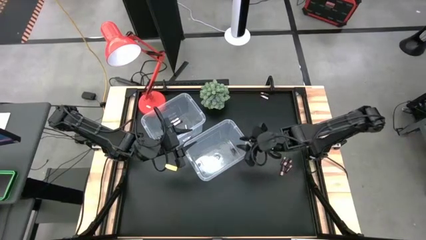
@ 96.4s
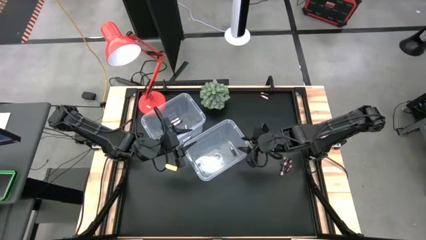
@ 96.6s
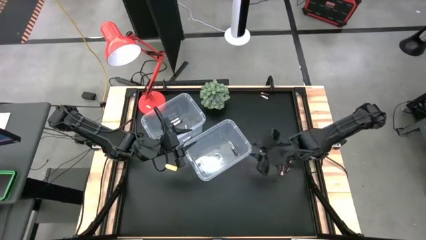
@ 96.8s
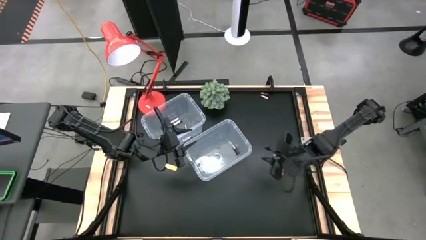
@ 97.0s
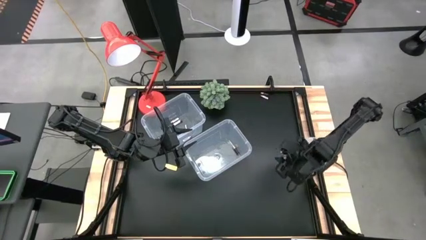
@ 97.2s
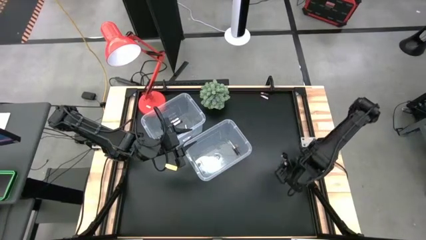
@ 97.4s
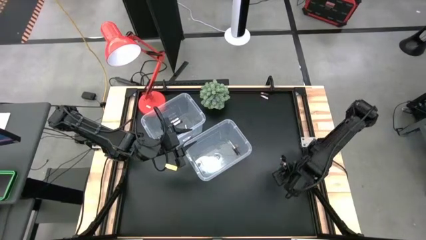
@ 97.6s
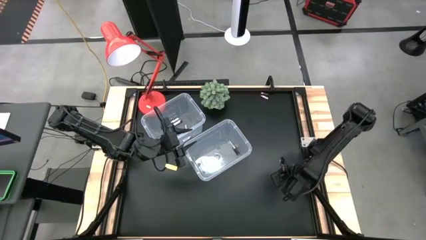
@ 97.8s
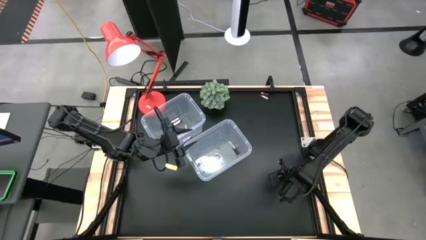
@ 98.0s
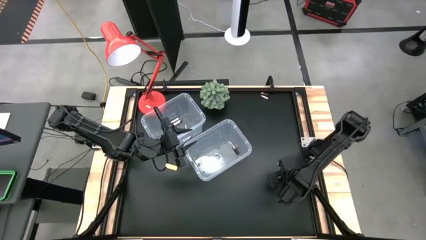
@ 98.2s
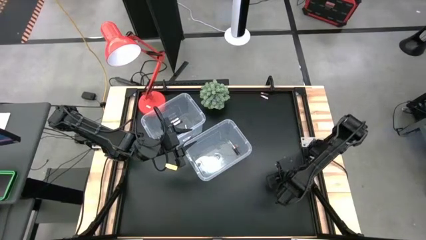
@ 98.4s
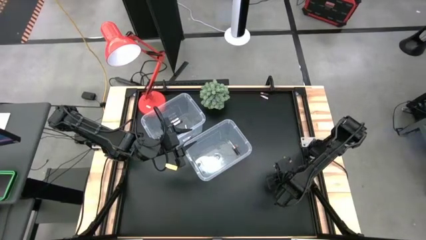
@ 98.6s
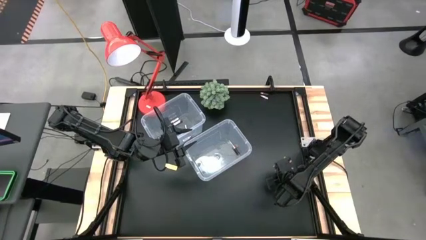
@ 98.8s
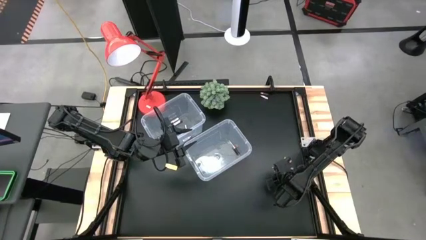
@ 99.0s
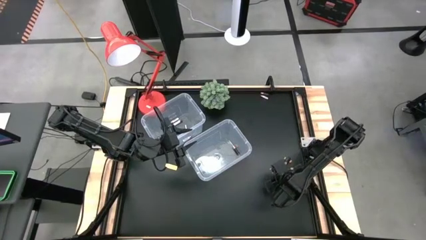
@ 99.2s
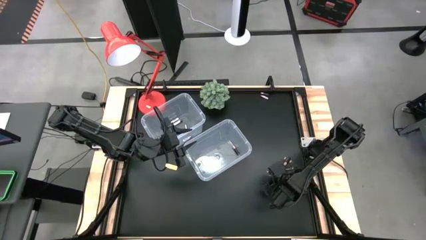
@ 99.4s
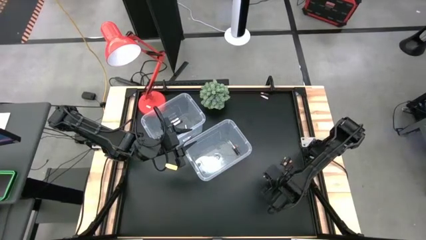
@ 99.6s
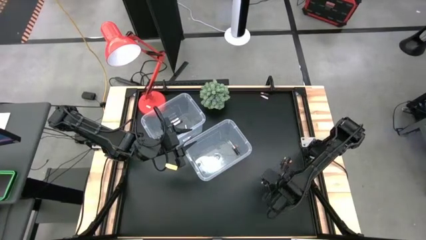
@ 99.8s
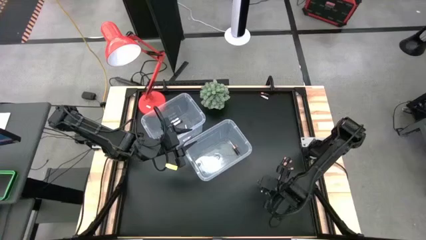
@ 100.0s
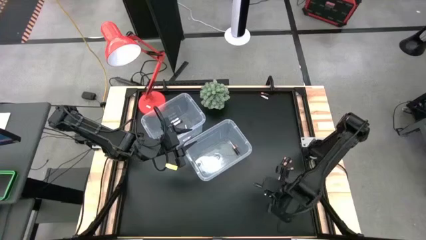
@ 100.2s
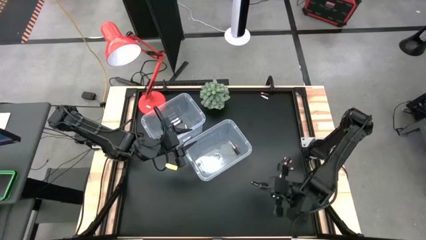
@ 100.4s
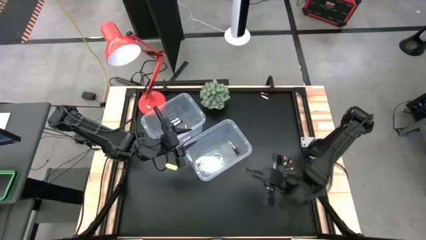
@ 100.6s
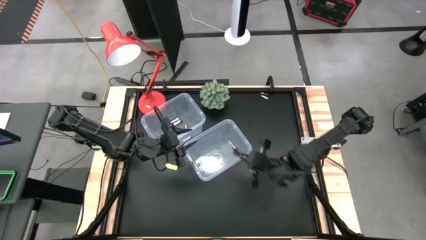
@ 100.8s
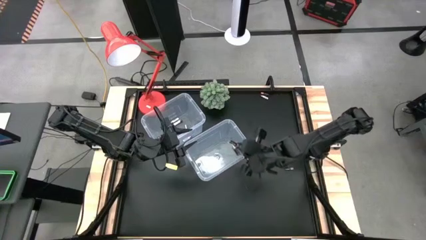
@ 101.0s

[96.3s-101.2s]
Task: Sort batteries
Put the brown battery into the bottom transparent bin

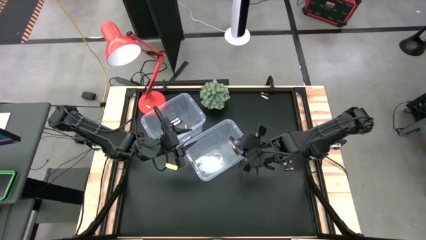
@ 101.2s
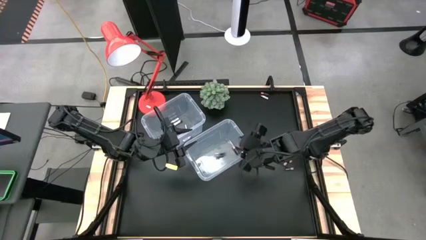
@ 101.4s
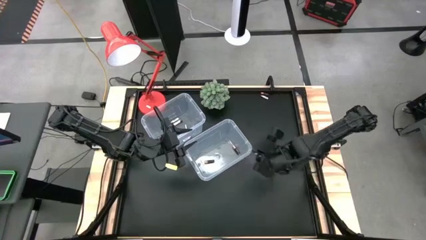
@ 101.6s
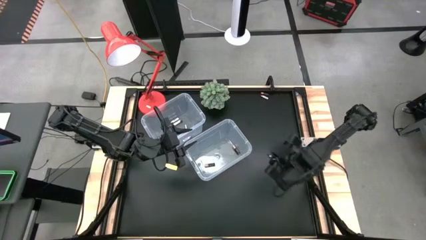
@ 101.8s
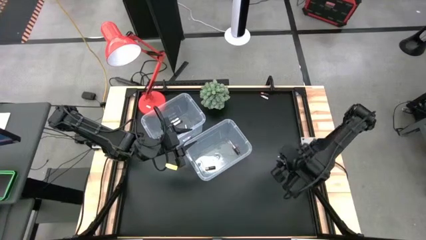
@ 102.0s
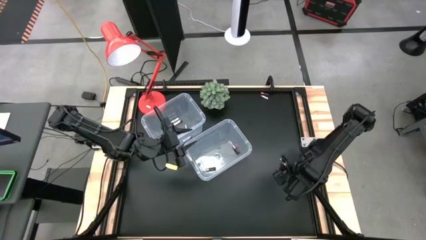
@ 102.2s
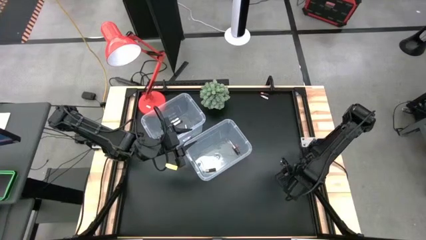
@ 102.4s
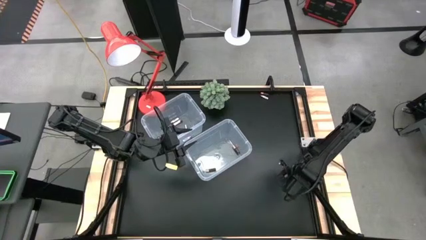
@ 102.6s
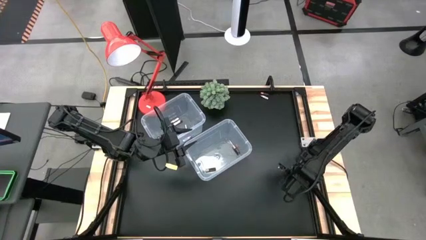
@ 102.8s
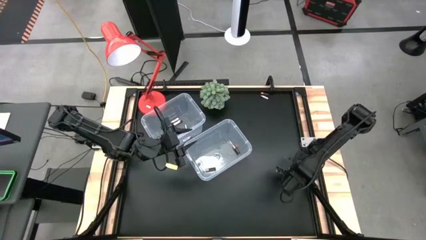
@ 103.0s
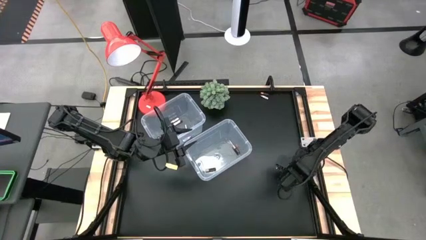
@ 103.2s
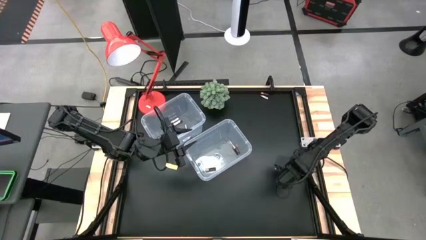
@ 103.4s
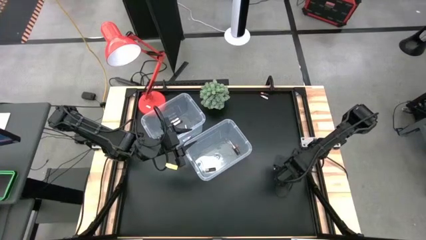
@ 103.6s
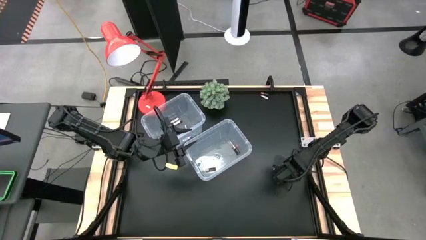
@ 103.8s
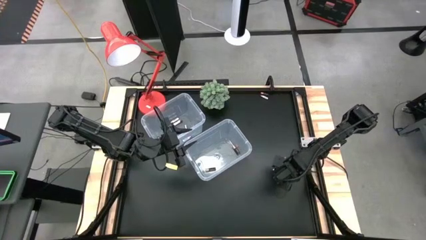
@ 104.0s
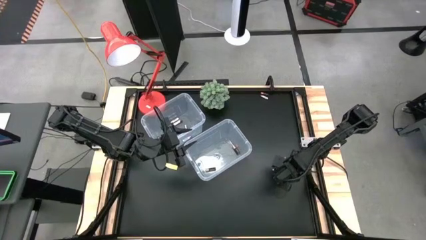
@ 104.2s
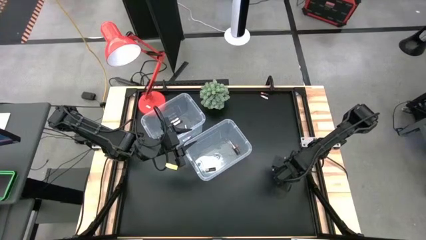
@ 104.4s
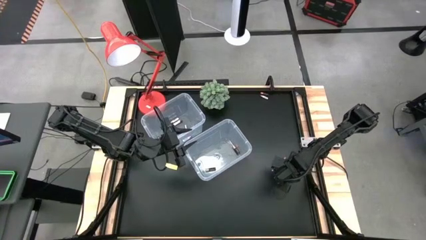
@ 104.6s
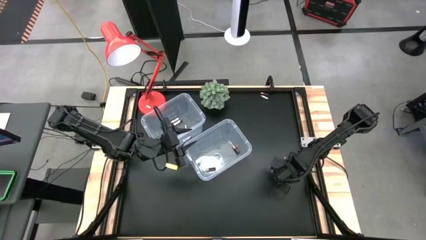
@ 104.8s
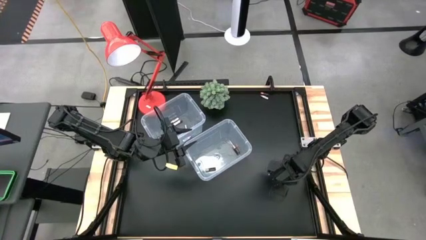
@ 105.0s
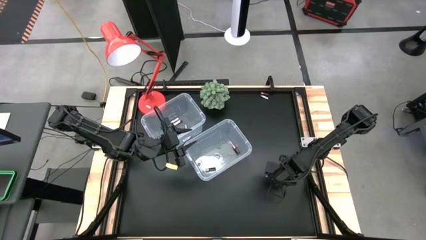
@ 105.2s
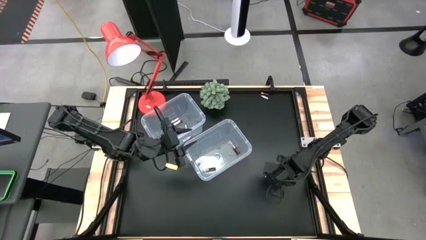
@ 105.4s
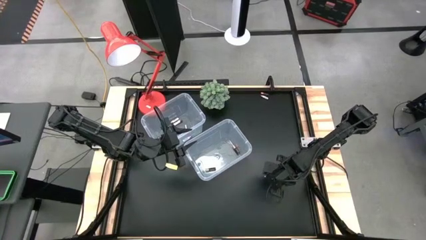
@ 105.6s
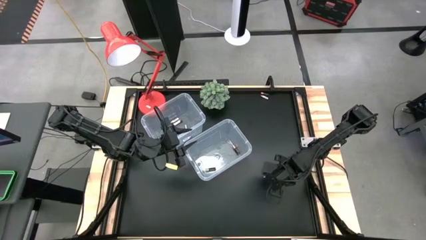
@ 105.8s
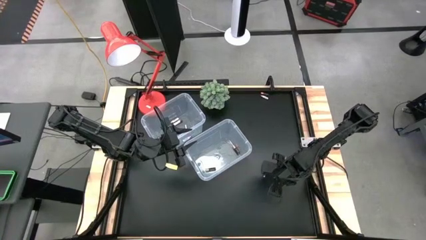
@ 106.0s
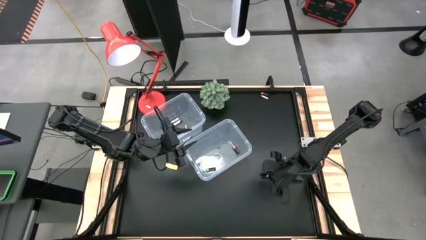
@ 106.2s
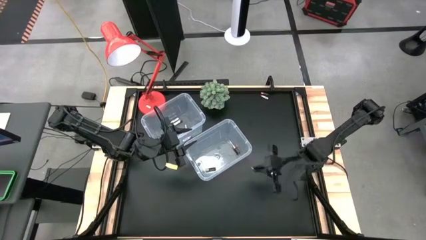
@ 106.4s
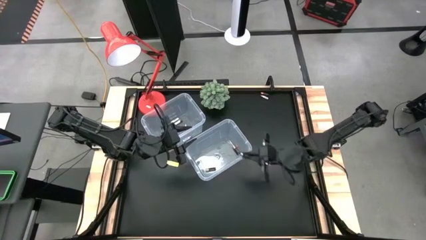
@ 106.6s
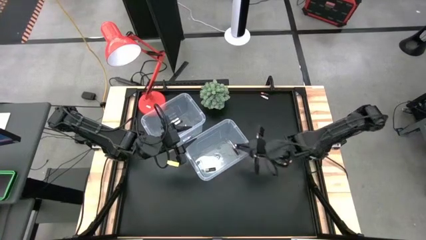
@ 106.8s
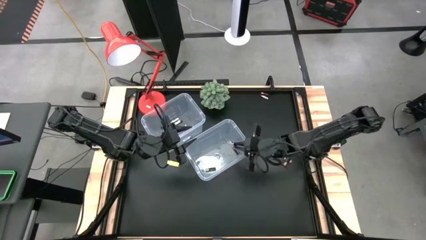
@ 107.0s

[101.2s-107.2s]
Put the brown battery into the bottom transparent bin

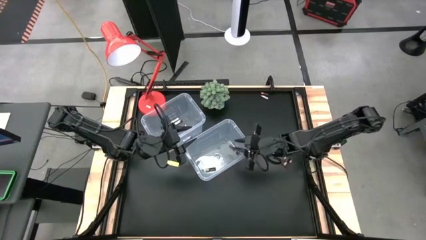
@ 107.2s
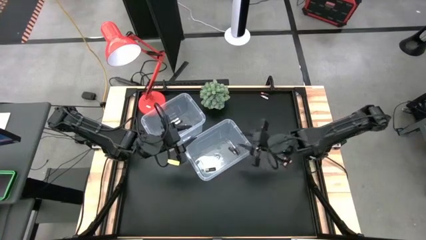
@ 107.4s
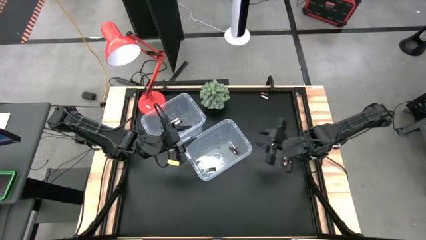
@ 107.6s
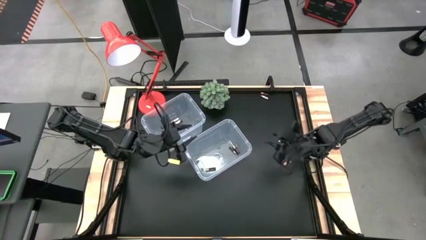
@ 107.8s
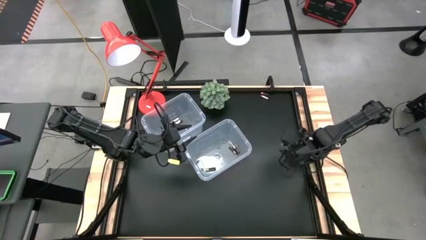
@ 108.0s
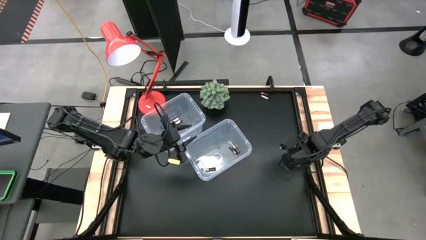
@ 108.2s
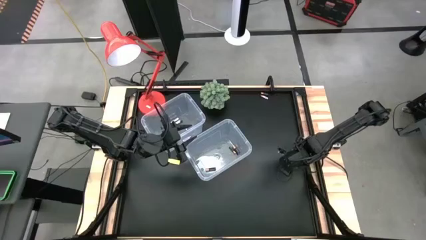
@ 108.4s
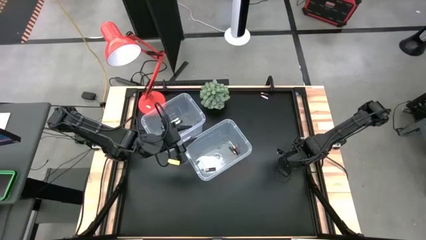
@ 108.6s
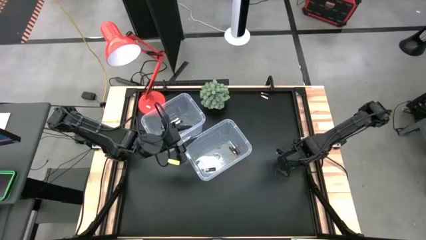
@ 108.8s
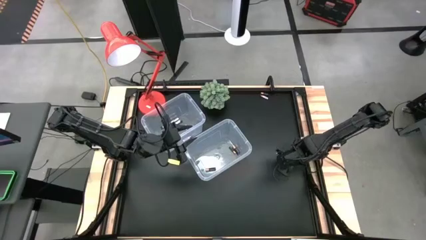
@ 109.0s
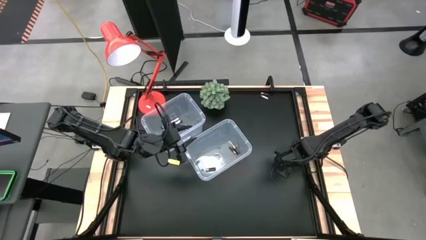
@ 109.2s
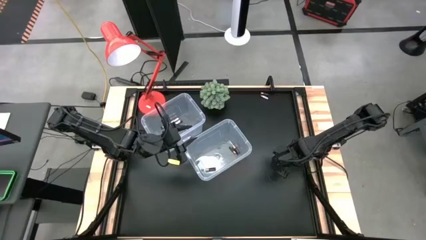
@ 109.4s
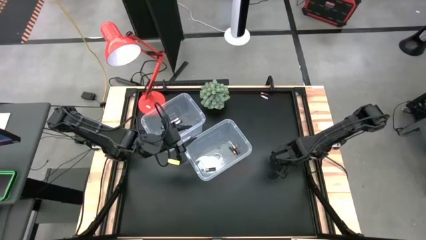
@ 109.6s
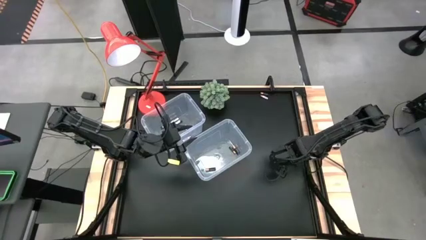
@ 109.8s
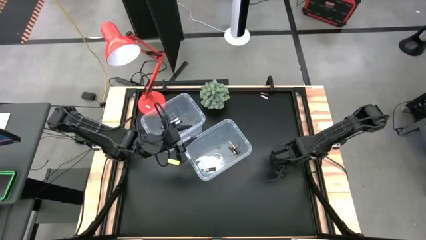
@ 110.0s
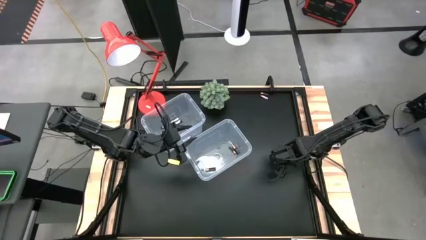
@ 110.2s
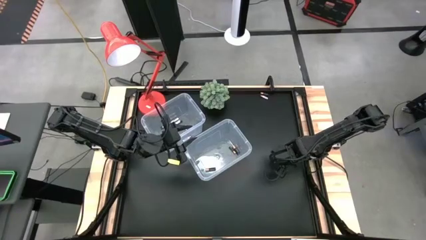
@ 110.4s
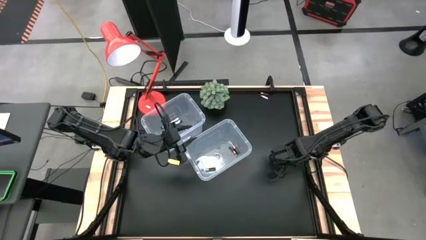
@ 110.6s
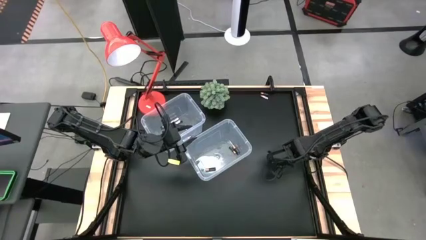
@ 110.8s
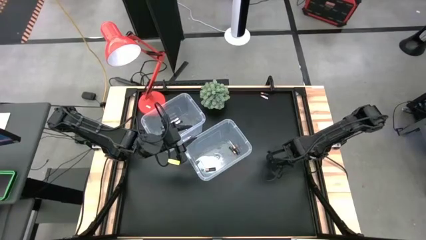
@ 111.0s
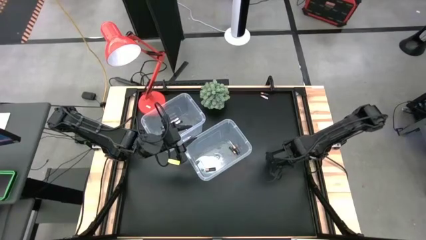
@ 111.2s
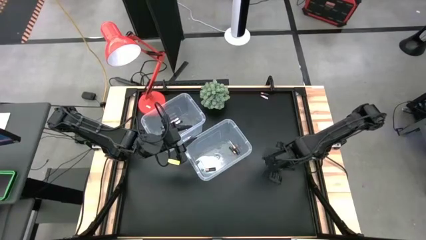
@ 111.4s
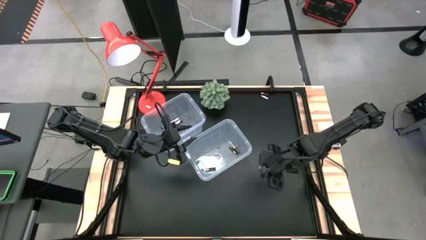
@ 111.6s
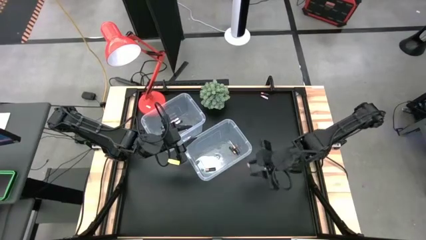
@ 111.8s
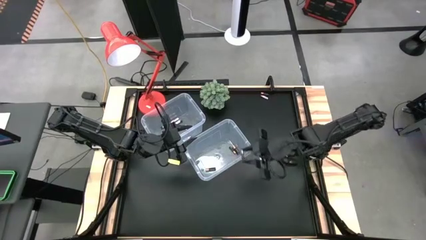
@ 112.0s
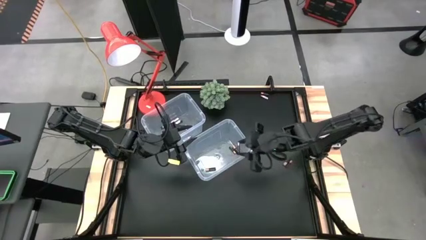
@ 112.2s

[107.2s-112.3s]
Put the brown battery into the bottom transparent bin
